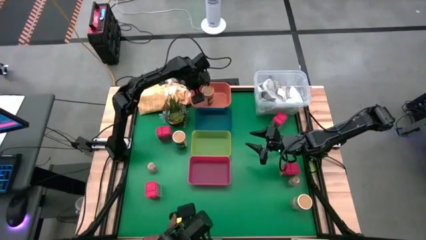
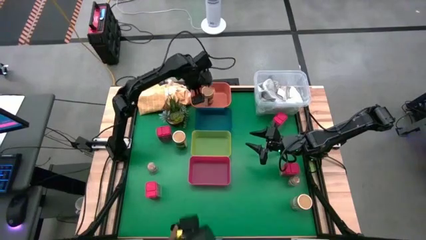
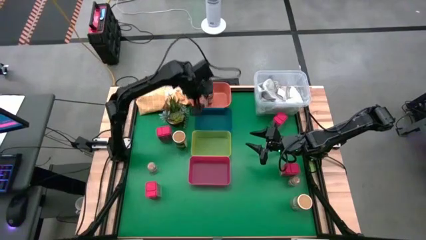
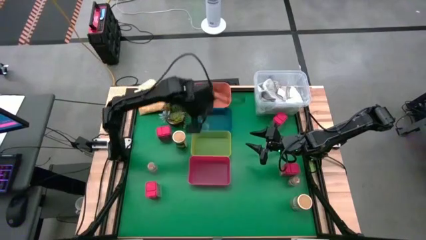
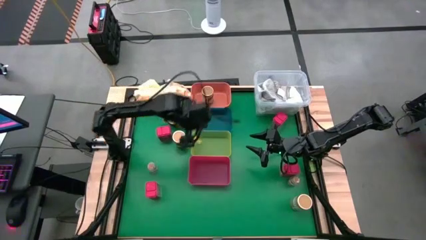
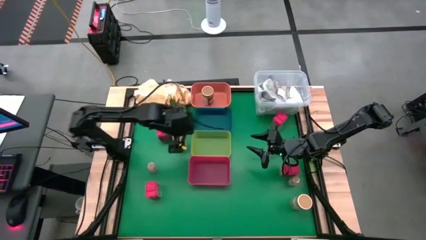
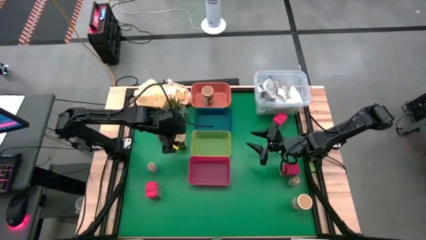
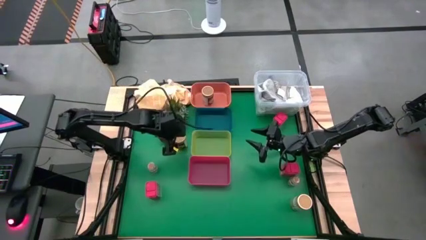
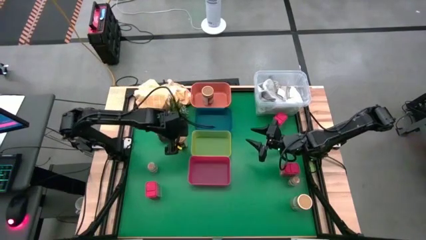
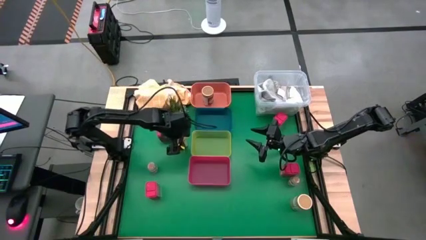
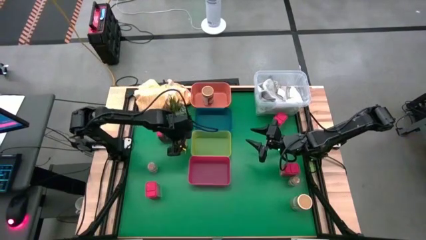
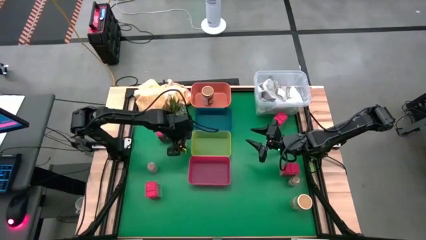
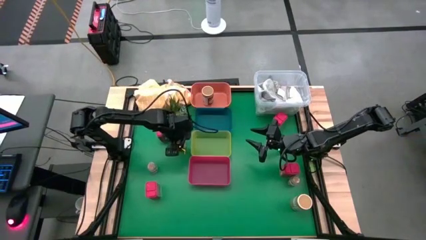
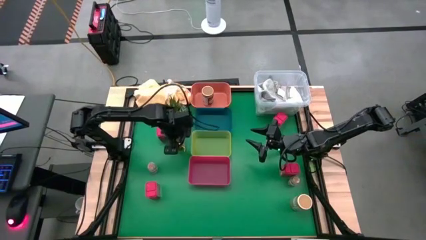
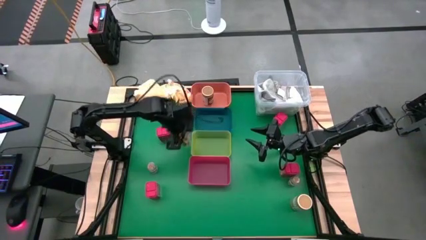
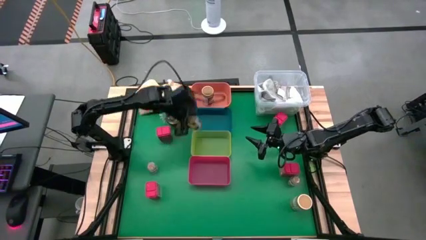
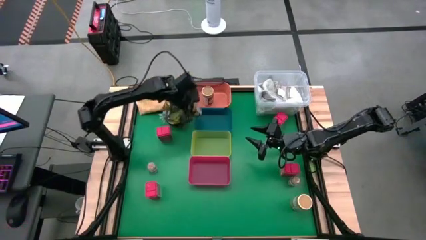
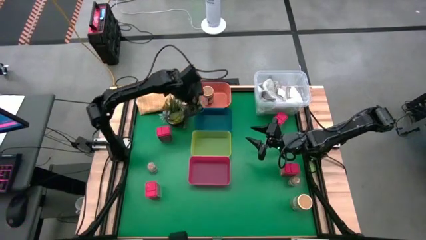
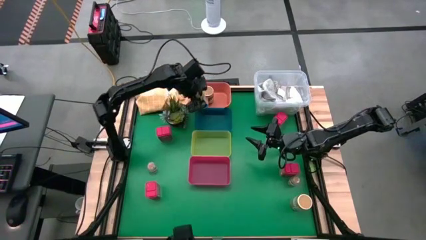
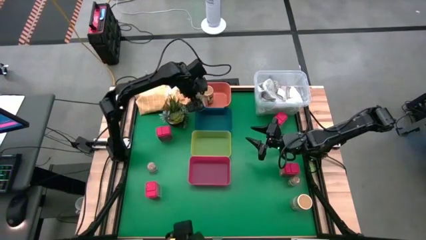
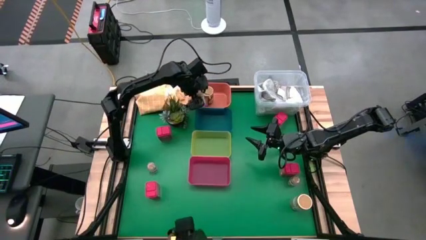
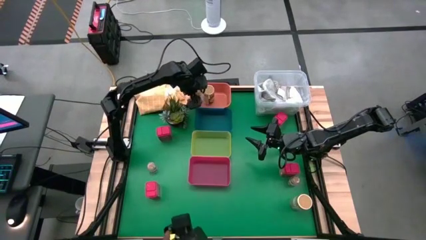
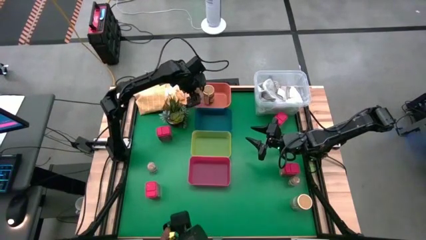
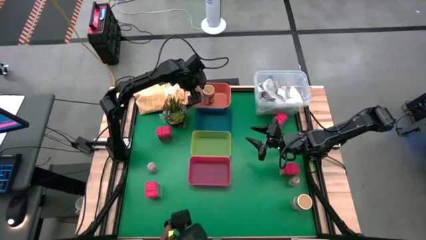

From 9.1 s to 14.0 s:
Task: Sort spices by type
Put the left gold spice bottle into the orange bin

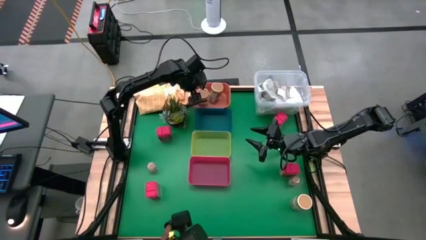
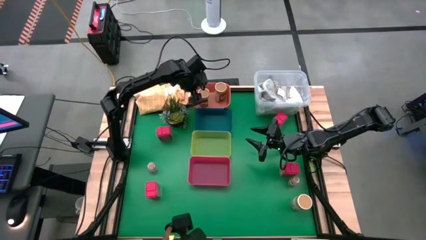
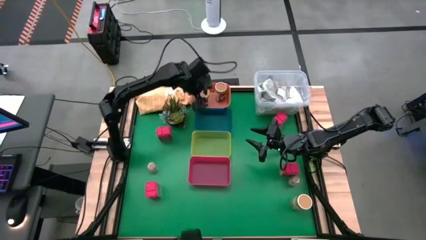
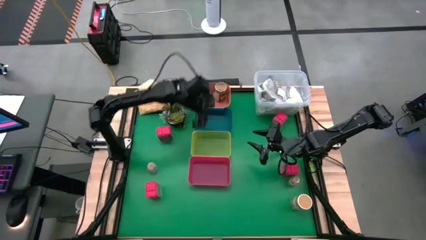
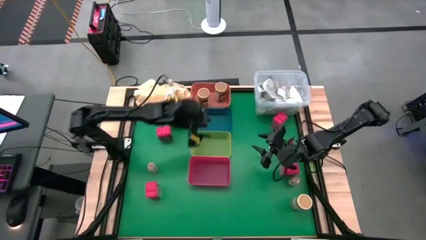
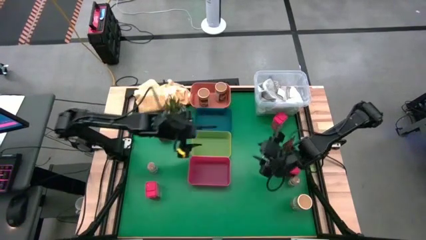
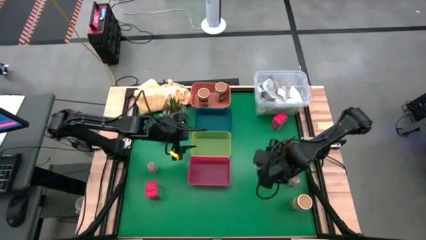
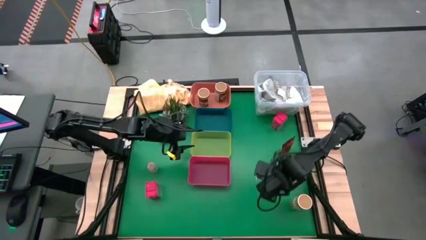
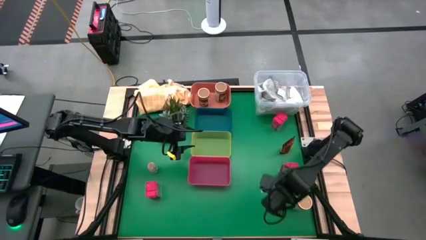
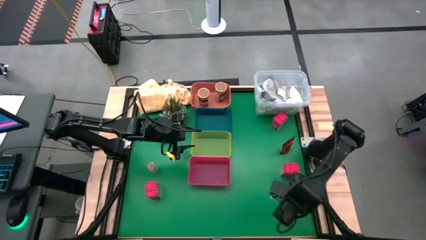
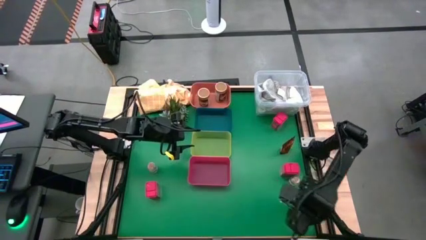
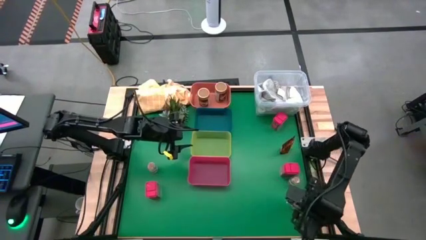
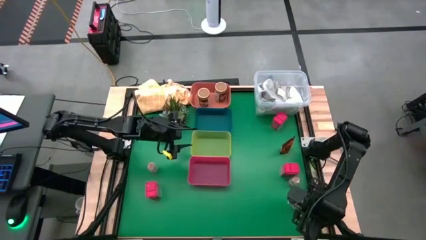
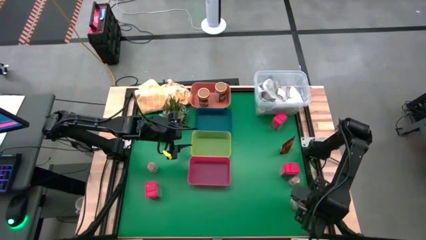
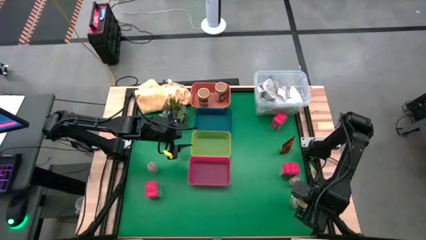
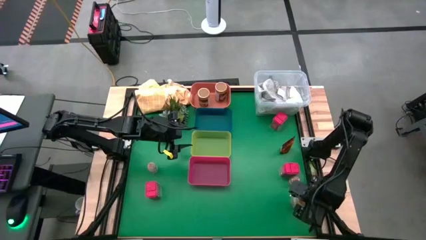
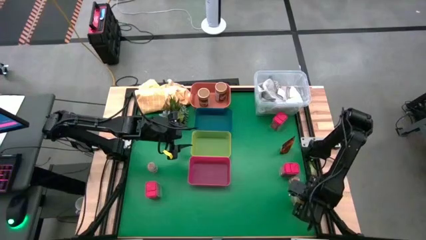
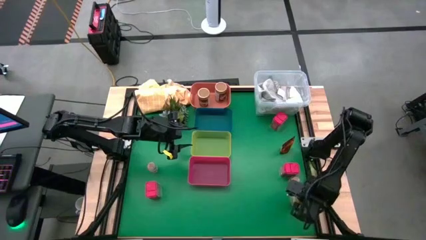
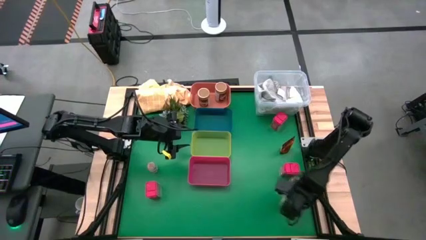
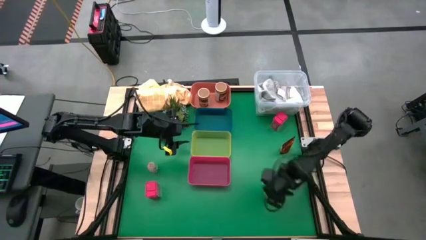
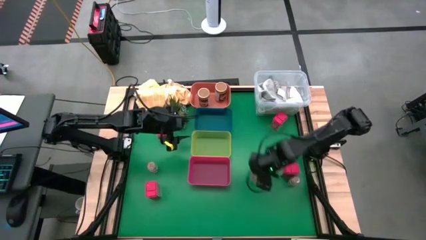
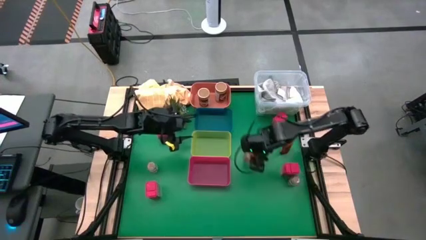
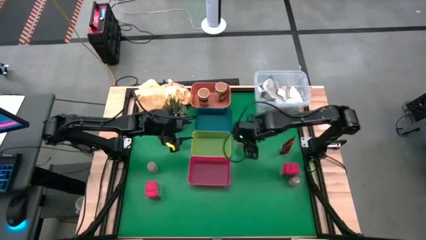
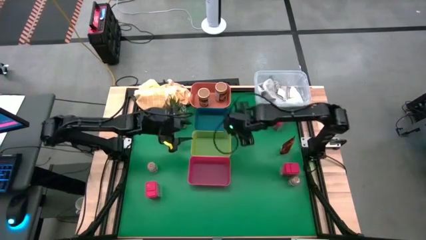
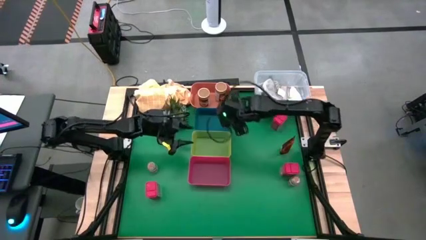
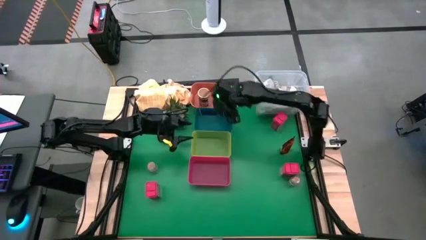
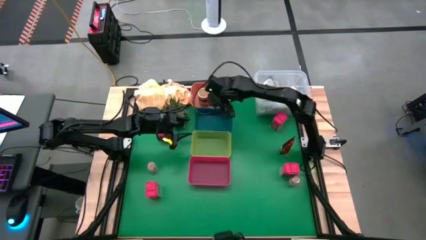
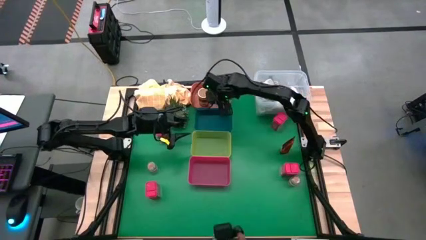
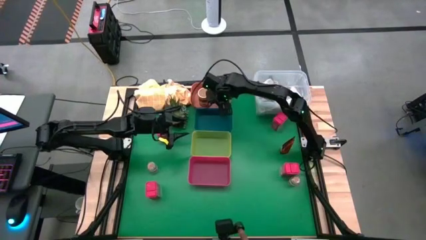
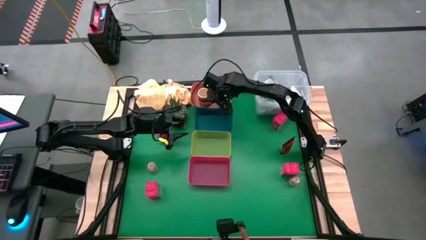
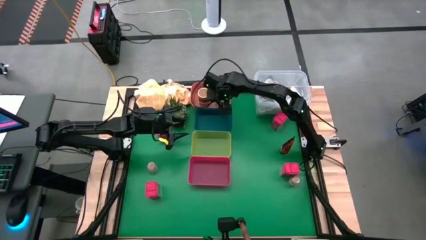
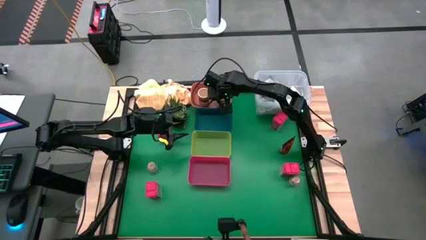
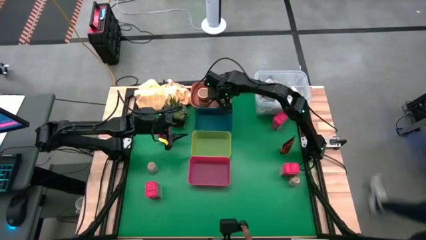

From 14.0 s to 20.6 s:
Put the gold spice bottle into the orange bin

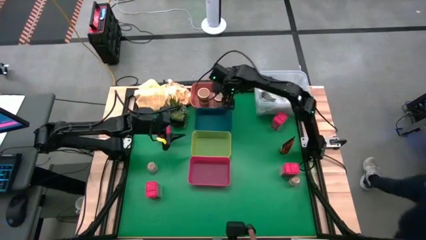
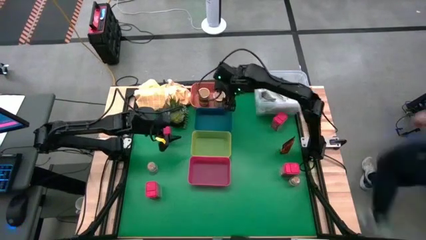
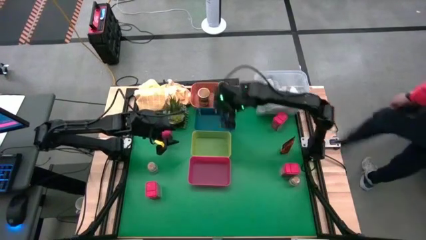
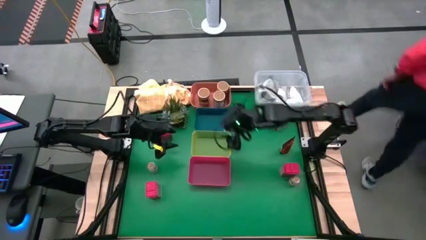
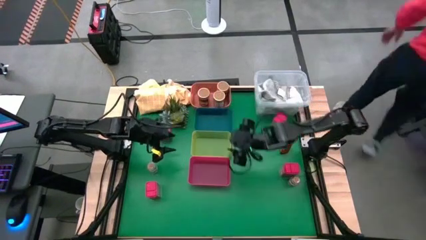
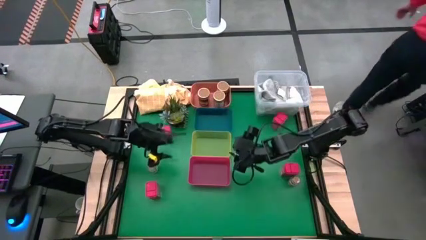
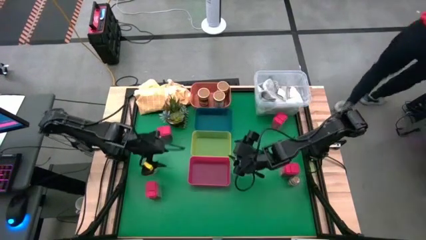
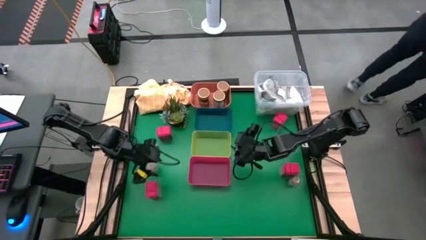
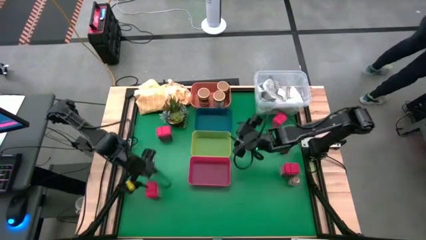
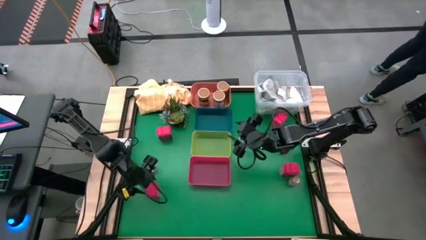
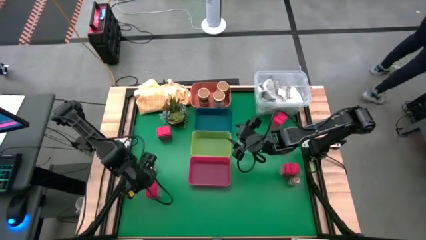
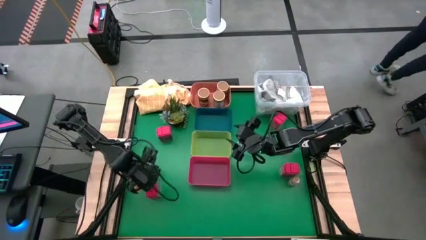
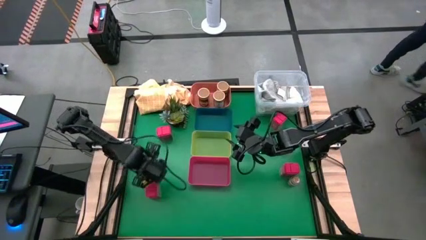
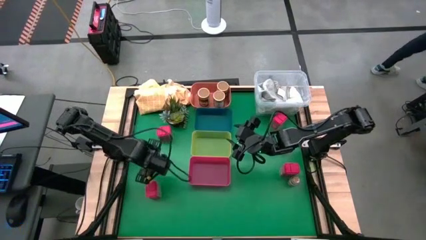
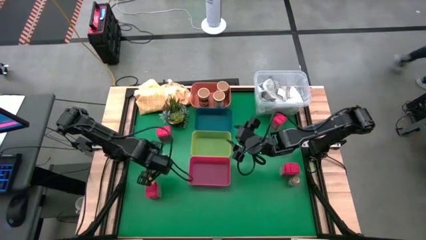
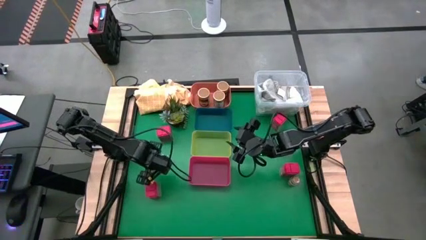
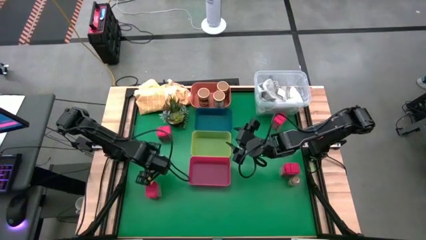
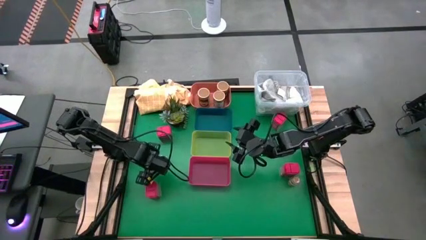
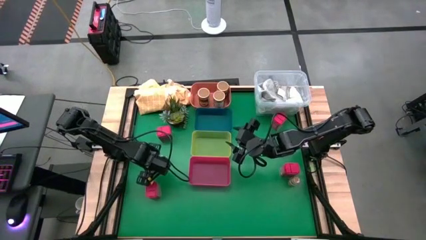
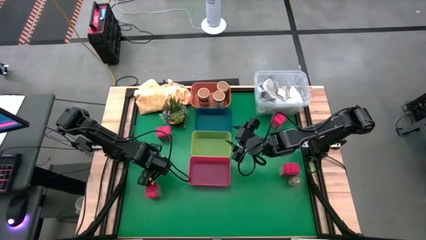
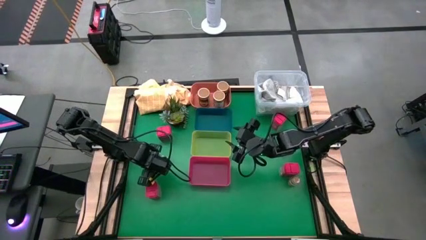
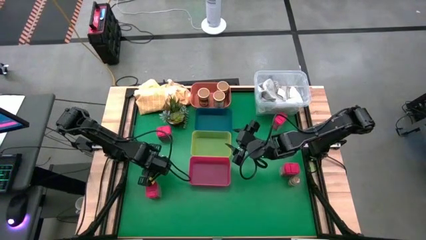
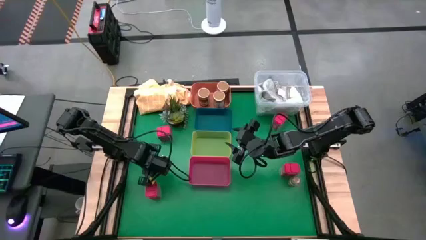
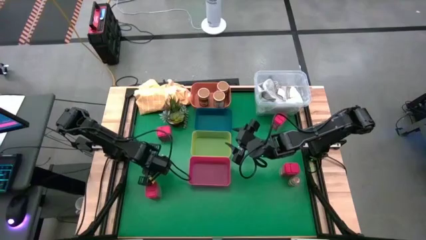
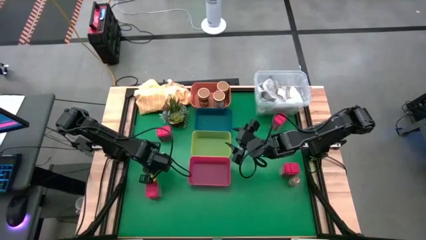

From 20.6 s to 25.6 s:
Put the left brown spice bottle into the blue bin
